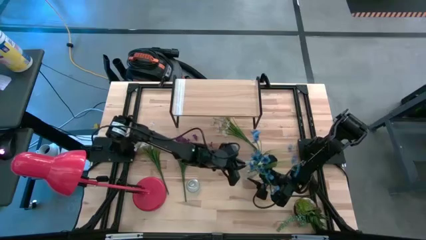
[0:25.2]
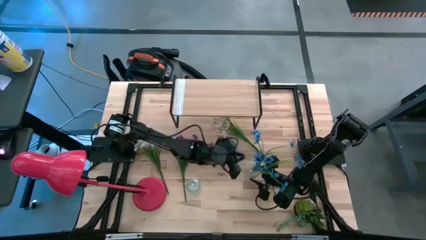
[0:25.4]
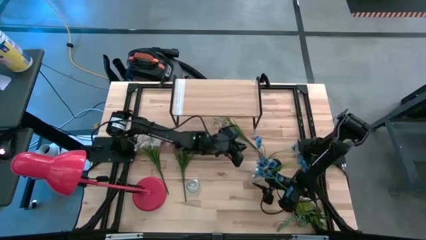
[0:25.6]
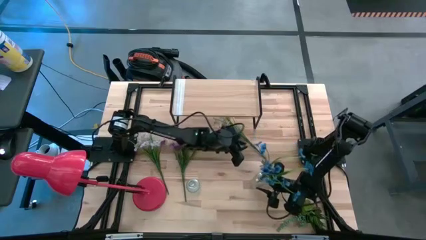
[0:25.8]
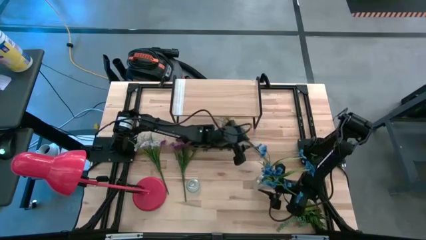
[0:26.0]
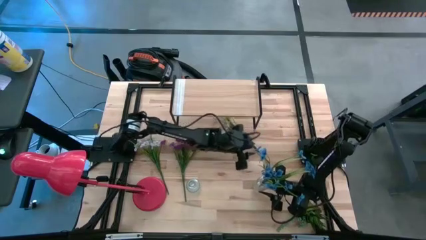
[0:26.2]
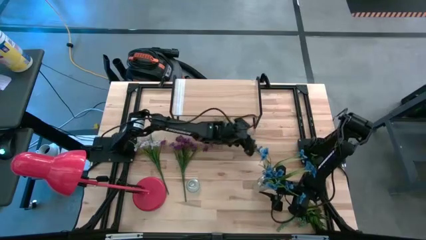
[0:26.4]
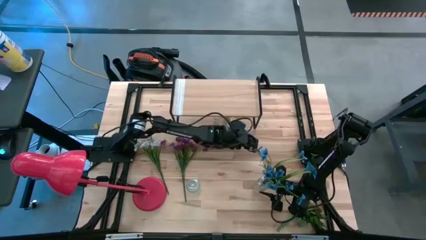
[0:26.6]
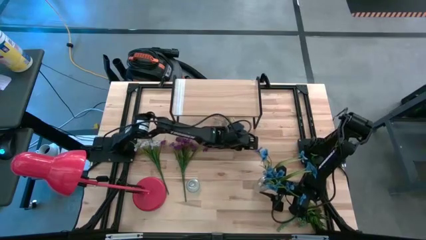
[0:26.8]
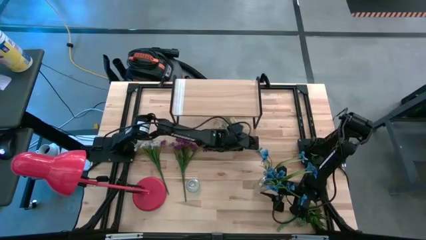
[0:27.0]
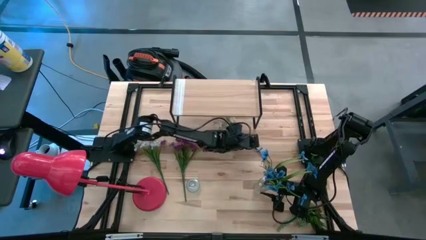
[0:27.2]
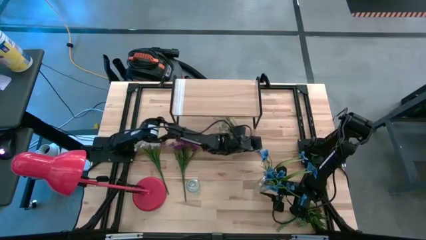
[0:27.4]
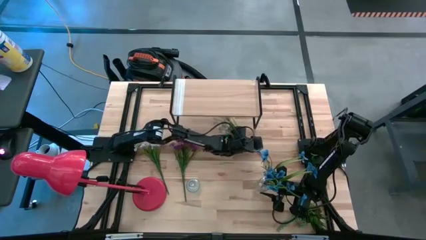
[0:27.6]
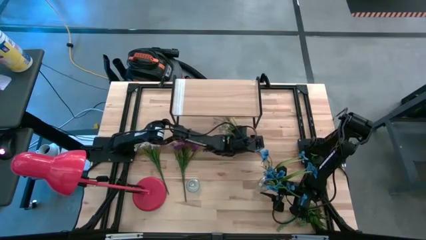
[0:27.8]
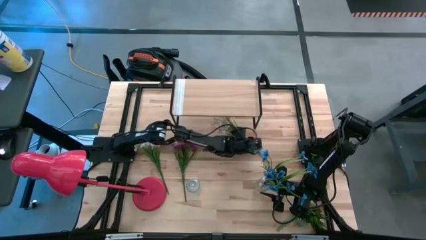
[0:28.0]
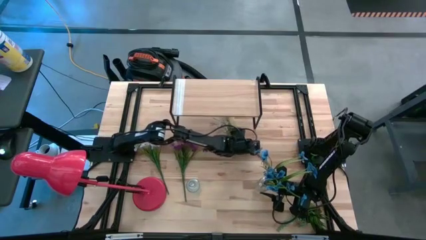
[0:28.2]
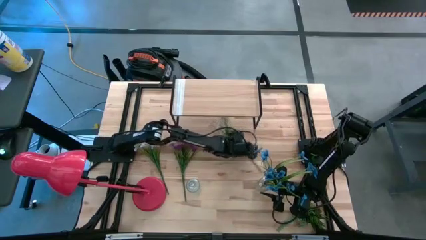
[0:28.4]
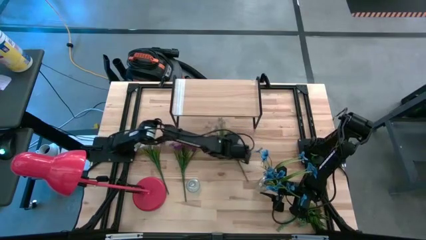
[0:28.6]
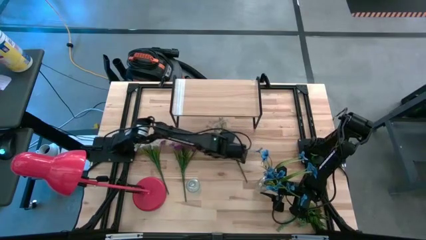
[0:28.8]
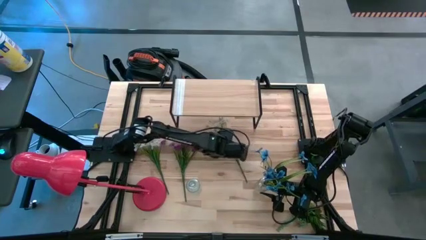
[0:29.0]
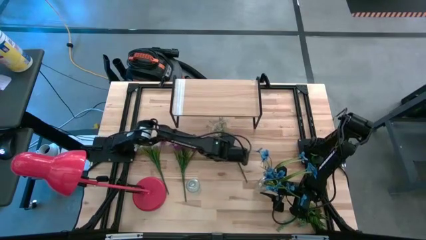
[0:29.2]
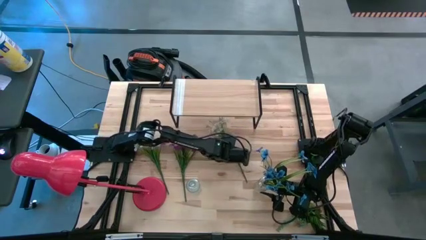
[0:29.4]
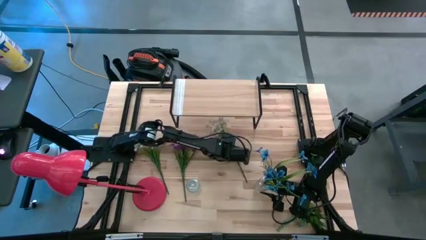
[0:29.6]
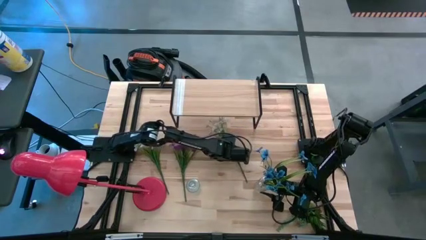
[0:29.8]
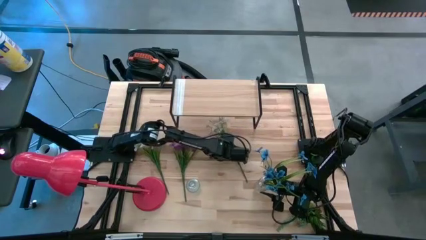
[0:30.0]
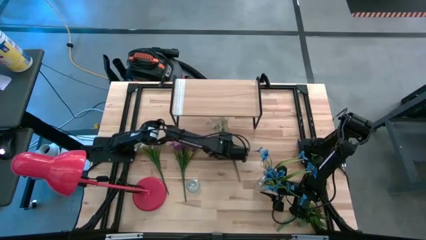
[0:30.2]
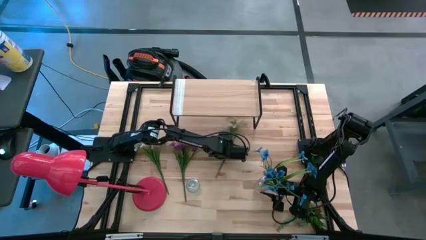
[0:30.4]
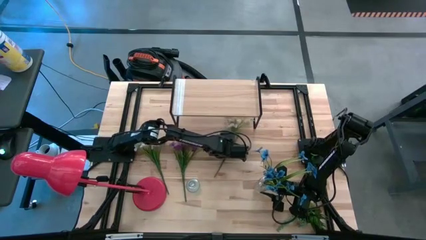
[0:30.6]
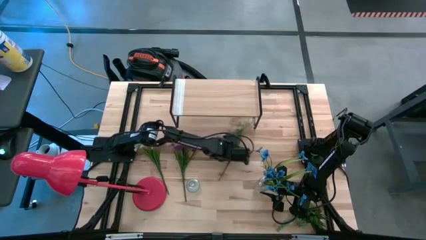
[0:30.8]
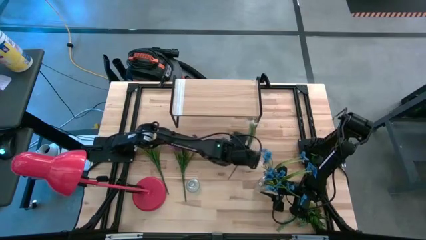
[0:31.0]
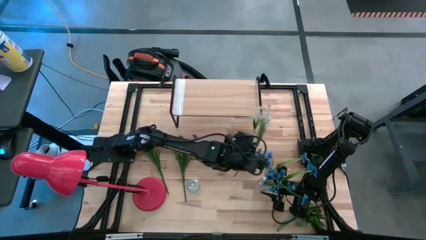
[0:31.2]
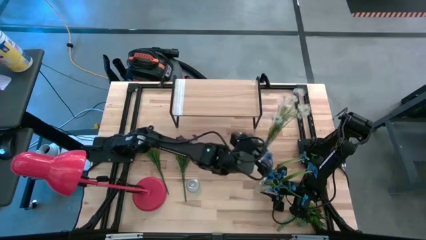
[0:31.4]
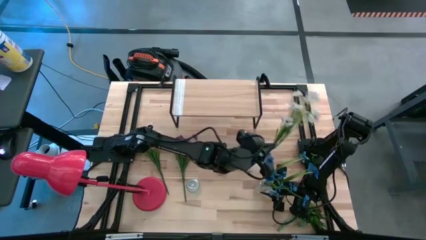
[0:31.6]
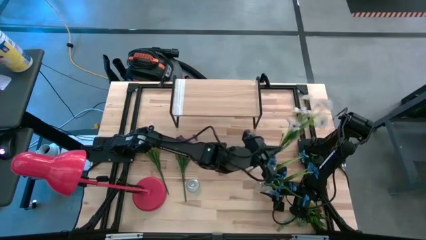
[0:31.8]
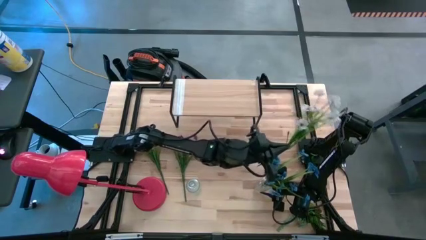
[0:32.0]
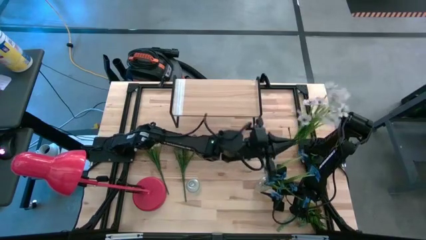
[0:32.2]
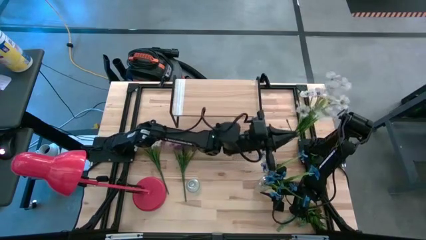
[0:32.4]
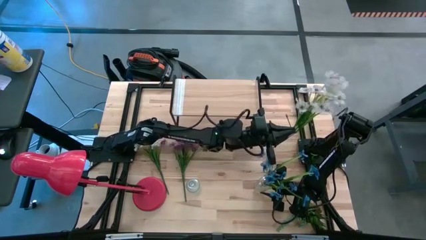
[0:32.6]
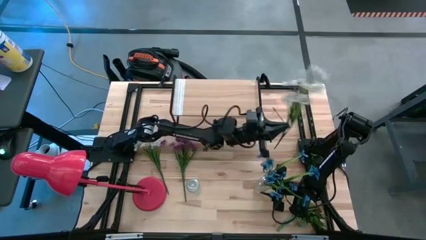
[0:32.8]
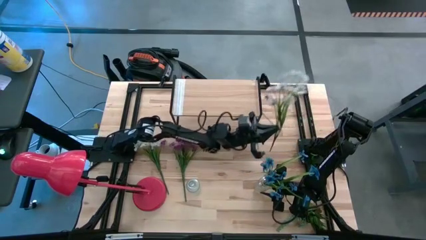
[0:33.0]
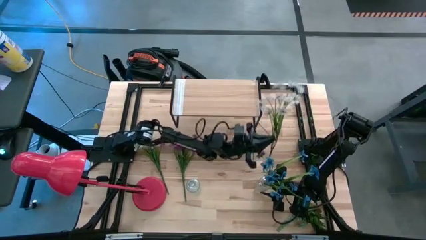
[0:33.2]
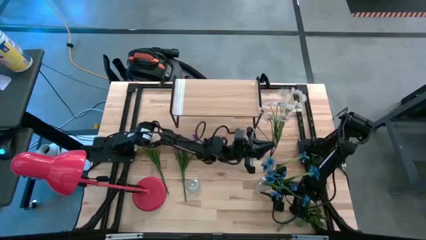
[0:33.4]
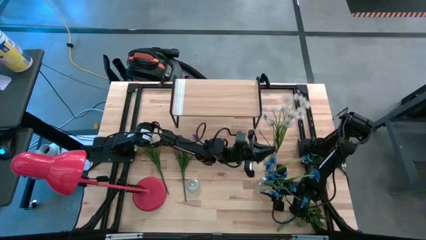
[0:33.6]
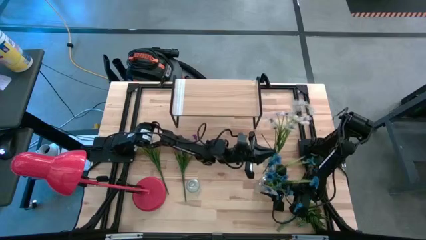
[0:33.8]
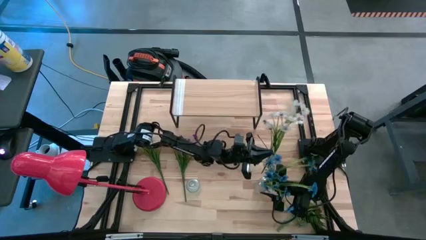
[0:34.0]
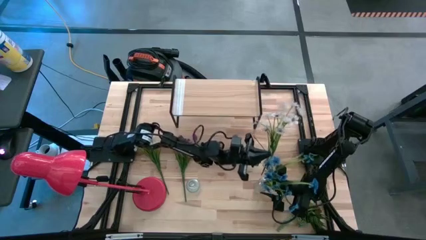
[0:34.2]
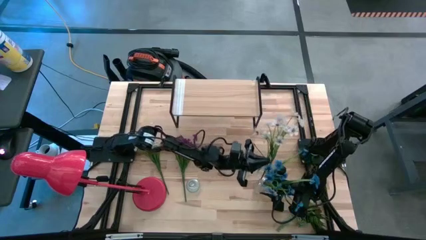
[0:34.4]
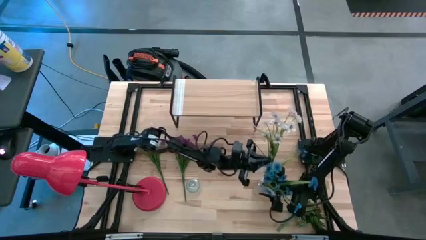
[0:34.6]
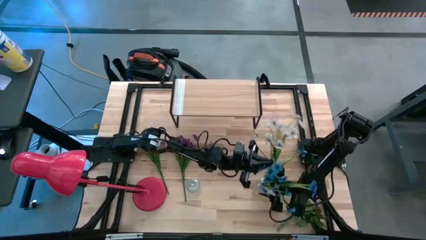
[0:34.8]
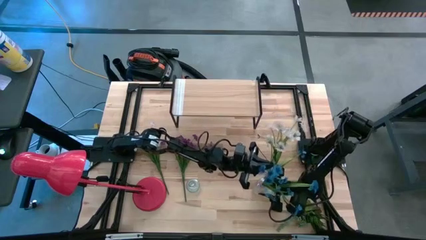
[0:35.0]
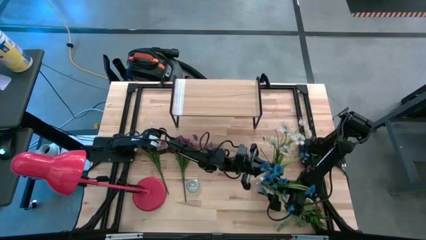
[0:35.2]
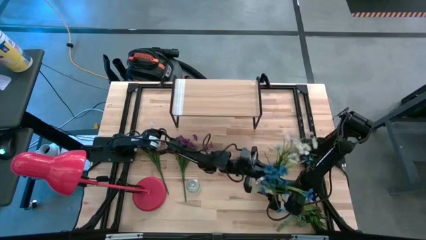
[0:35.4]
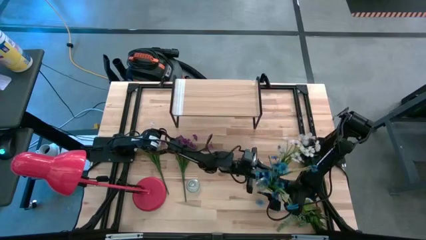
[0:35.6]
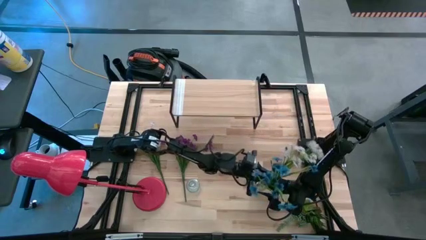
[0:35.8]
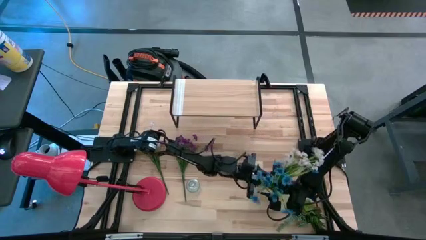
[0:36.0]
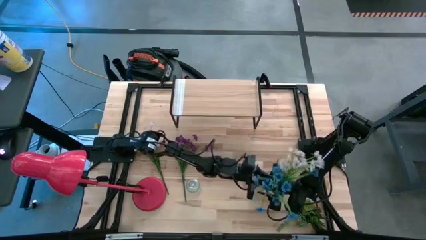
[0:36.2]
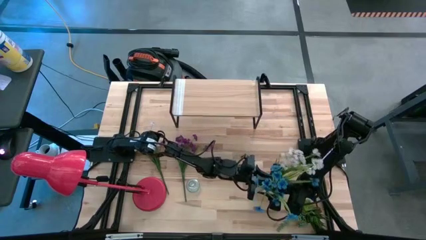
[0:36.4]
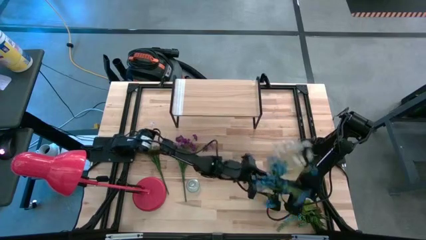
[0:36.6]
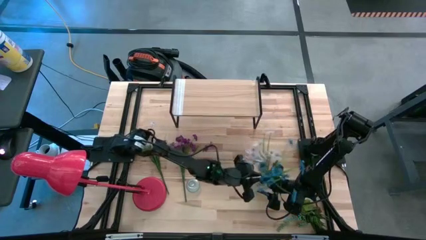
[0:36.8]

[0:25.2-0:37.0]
Task: Pick and place flowers into a vace then onto a shelf
Put the right white flowers into the the right transparent vase

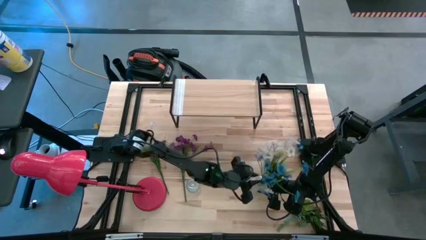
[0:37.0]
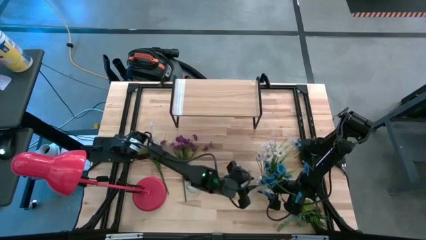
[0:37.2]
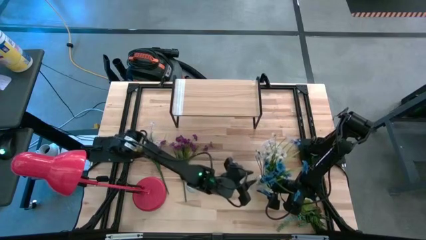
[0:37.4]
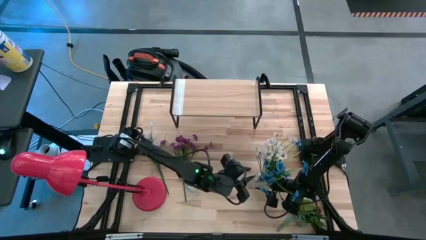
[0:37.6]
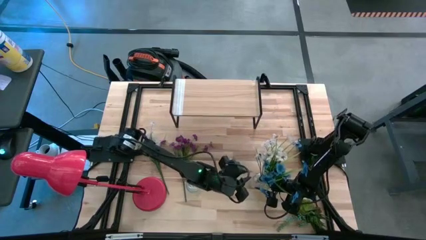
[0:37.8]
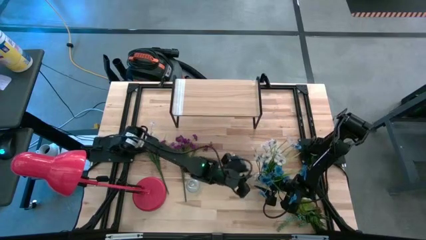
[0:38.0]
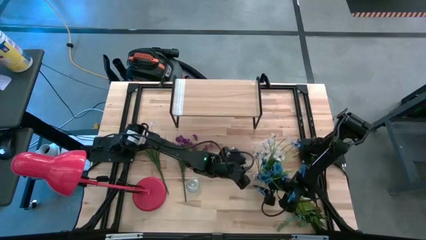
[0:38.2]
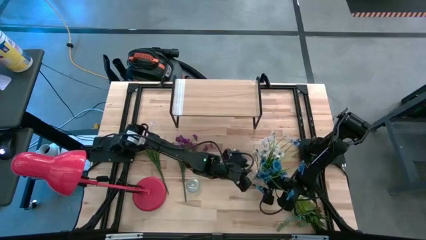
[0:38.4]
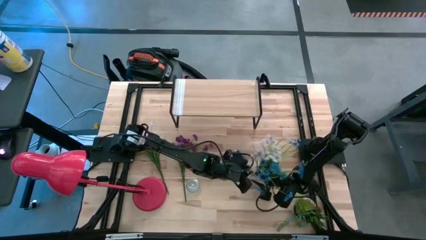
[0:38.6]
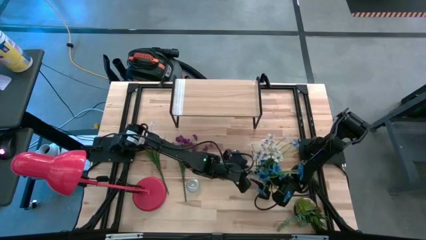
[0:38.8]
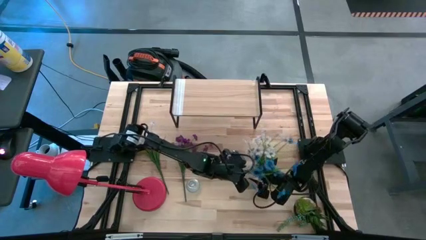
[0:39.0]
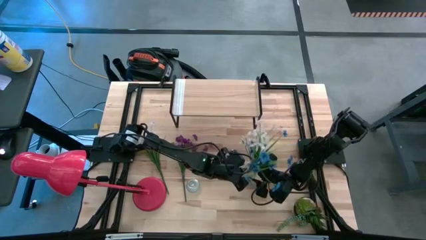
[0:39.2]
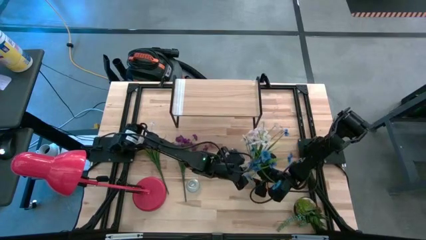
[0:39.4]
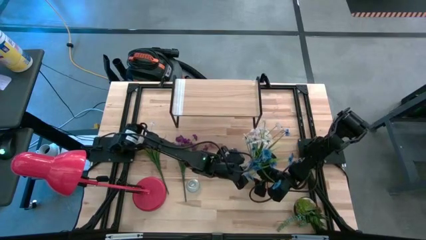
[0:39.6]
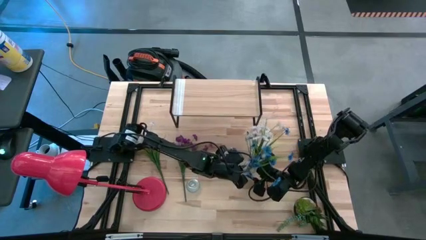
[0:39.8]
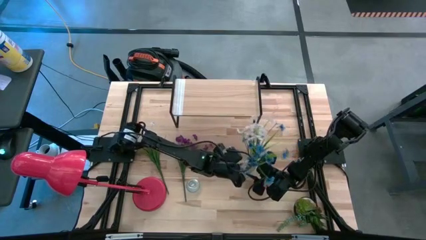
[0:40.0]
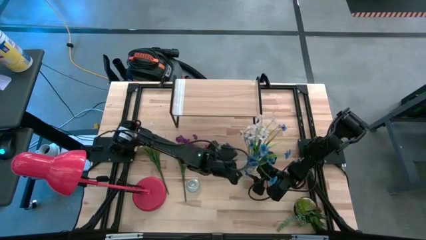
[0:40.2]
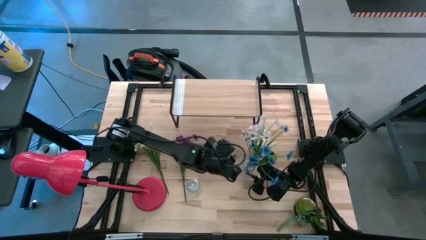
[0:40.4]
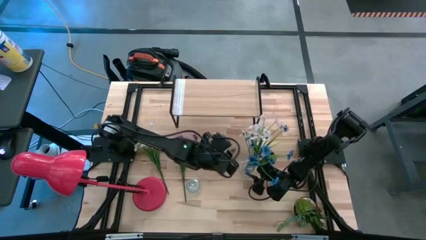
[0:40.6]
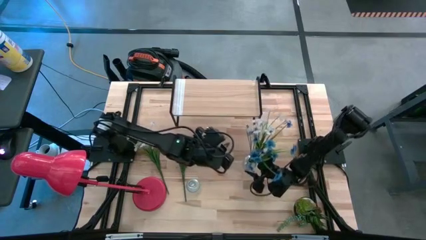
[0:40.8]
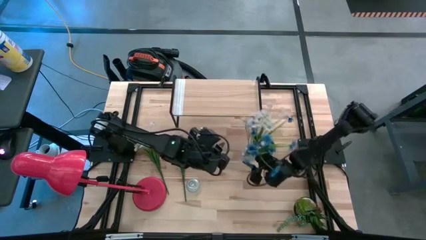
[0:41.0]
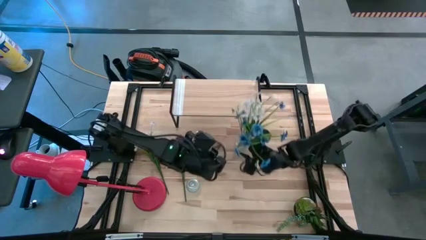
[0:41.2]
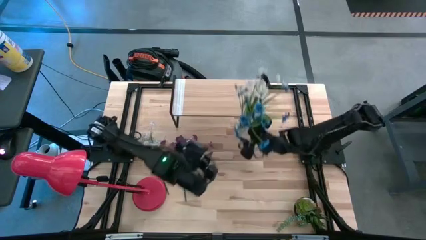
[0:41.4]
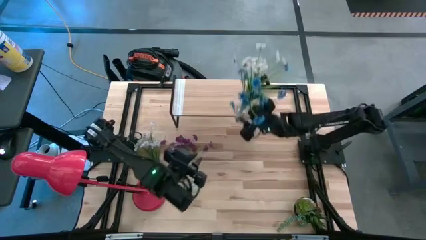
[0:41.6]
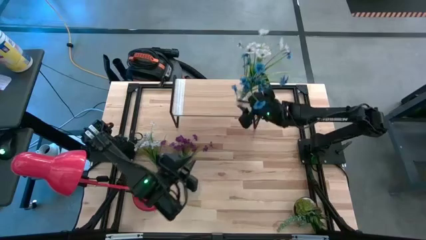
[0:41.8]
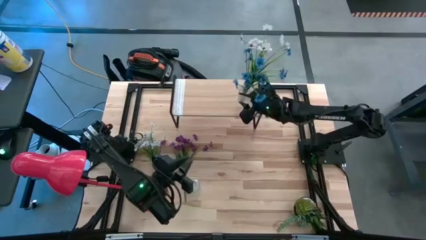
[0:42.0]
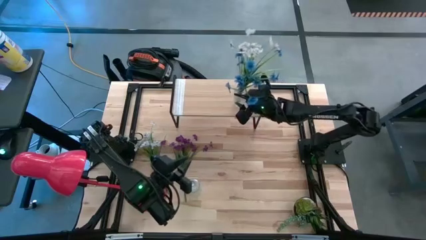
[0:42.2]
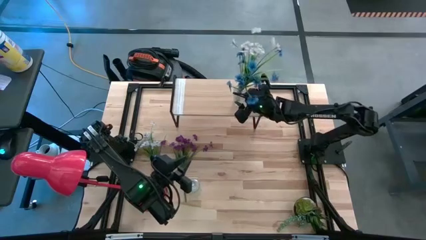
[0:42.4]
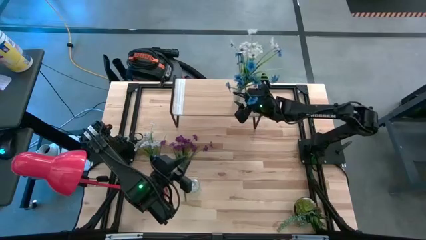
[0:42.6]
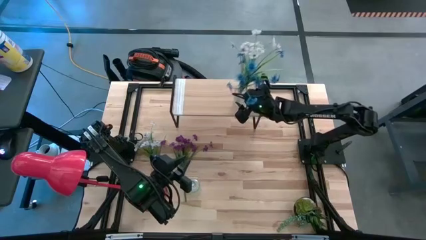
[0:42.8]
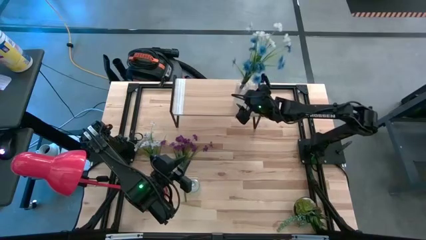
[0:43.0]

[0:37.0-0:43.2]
Put the right flower vase on the shelf
